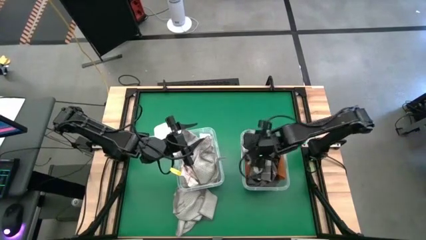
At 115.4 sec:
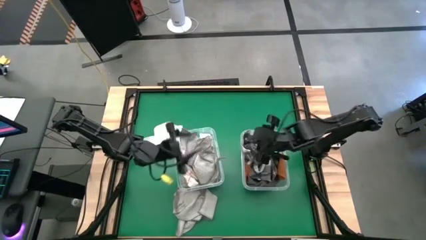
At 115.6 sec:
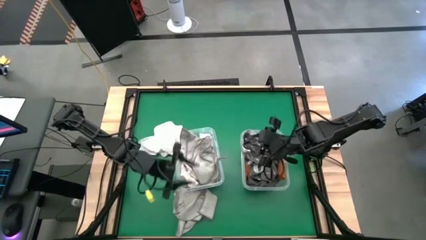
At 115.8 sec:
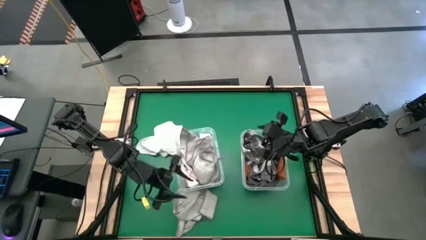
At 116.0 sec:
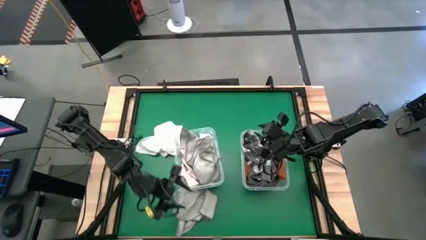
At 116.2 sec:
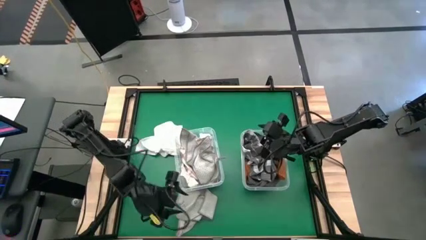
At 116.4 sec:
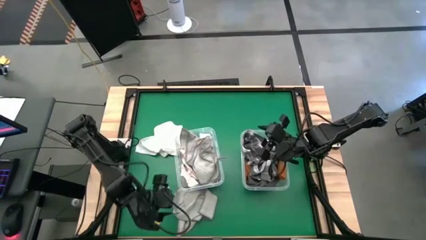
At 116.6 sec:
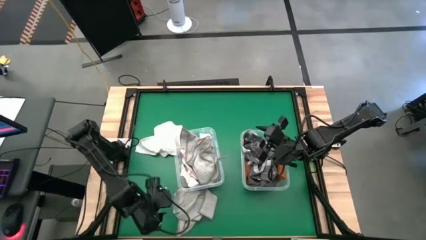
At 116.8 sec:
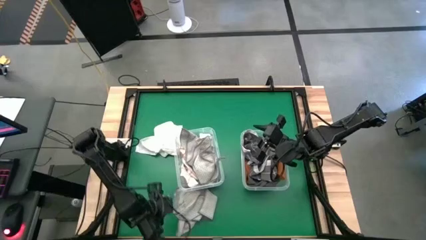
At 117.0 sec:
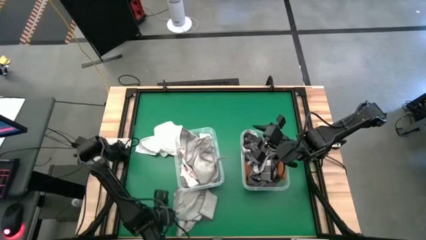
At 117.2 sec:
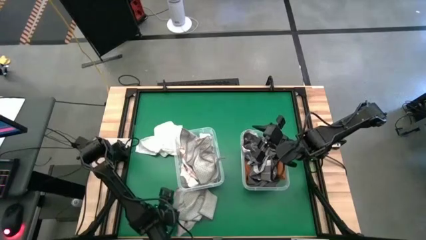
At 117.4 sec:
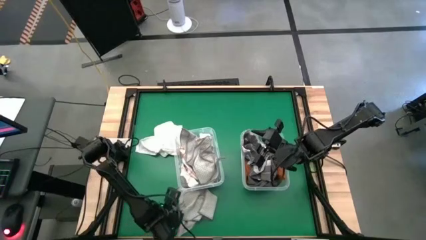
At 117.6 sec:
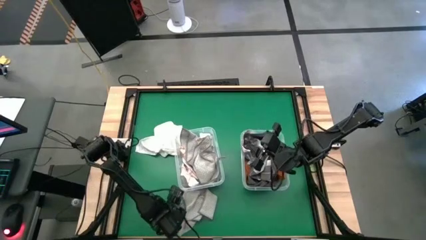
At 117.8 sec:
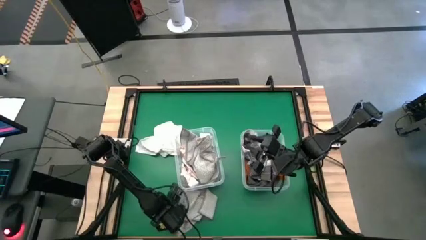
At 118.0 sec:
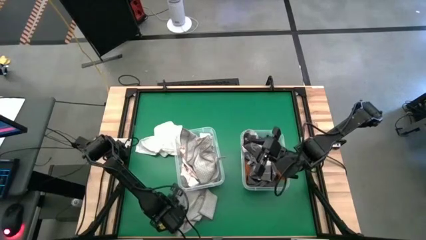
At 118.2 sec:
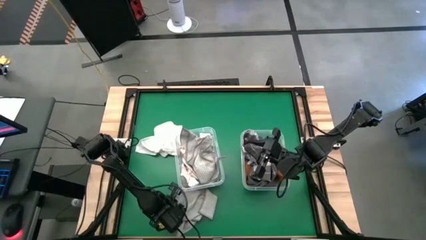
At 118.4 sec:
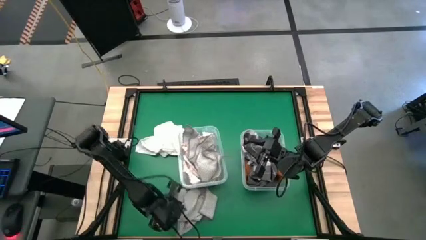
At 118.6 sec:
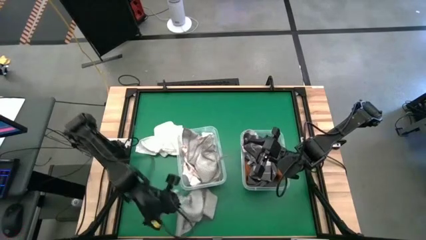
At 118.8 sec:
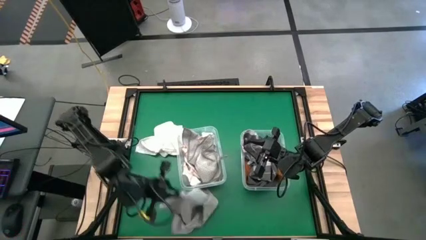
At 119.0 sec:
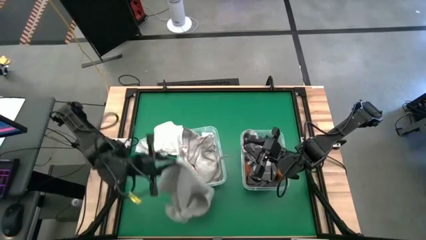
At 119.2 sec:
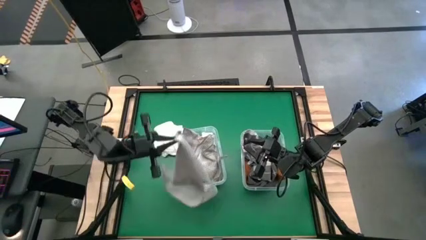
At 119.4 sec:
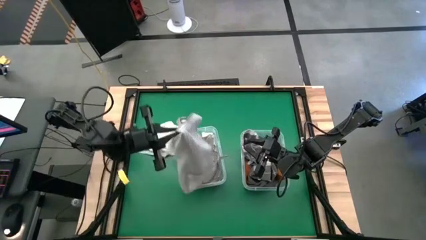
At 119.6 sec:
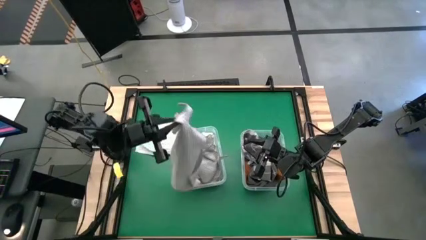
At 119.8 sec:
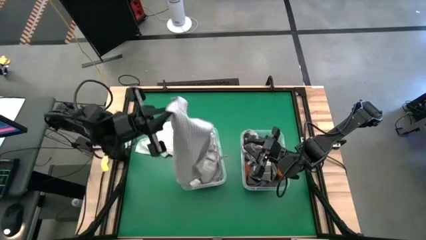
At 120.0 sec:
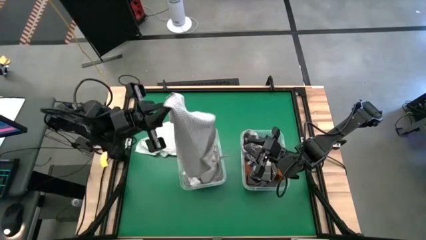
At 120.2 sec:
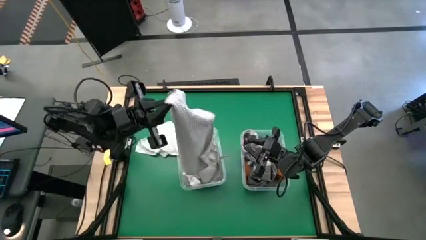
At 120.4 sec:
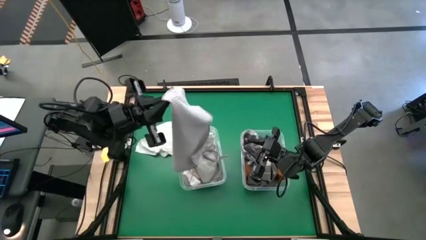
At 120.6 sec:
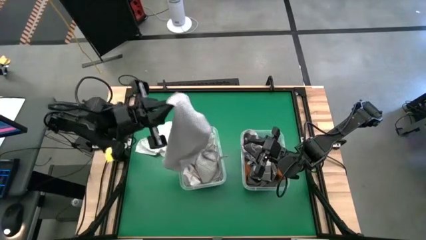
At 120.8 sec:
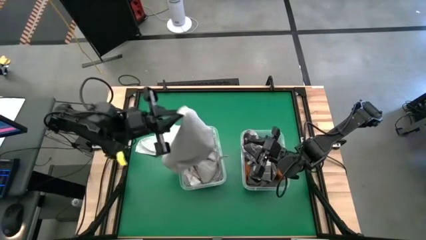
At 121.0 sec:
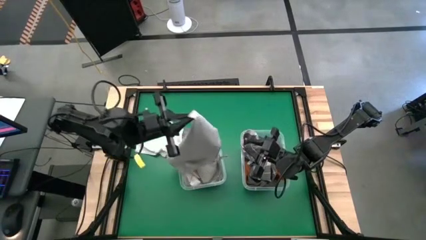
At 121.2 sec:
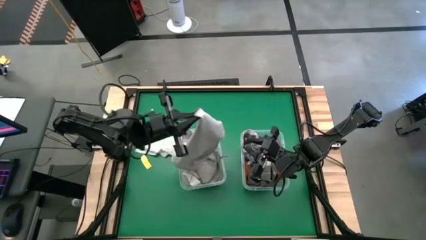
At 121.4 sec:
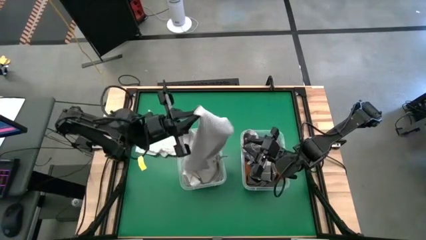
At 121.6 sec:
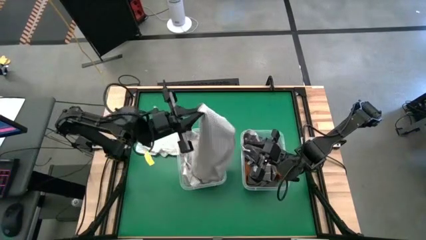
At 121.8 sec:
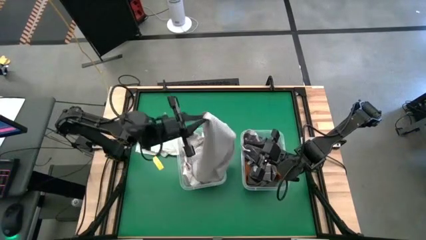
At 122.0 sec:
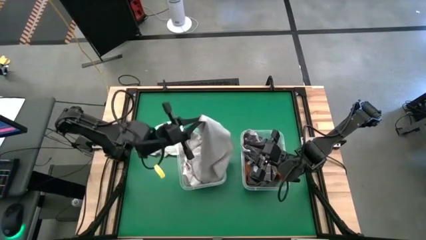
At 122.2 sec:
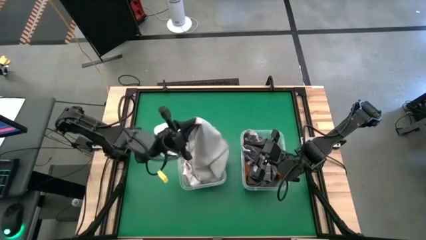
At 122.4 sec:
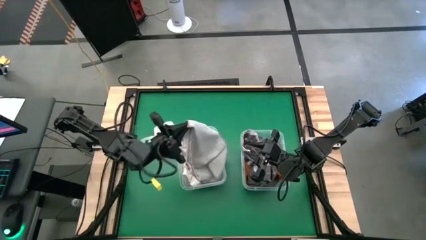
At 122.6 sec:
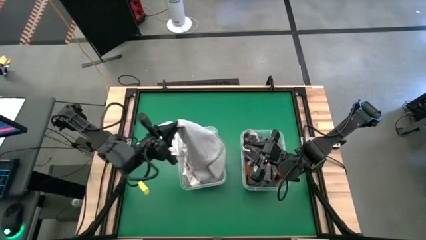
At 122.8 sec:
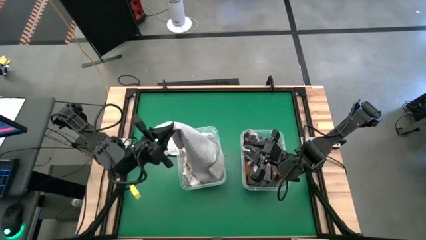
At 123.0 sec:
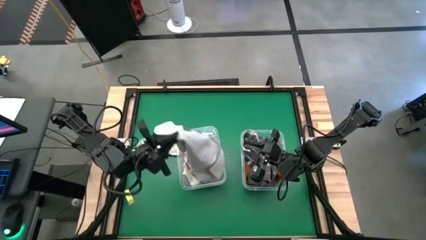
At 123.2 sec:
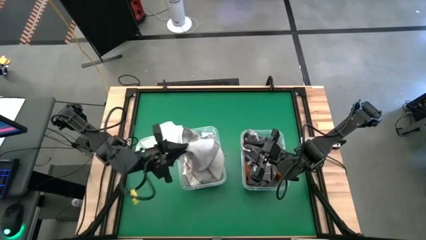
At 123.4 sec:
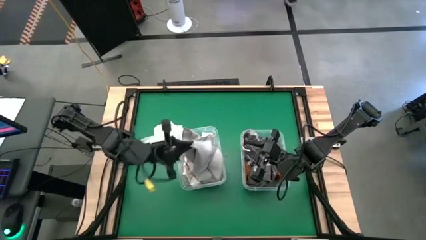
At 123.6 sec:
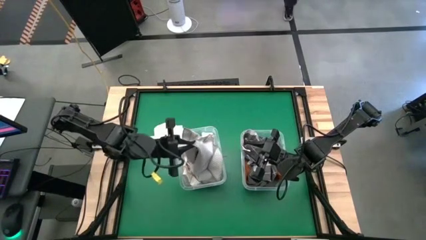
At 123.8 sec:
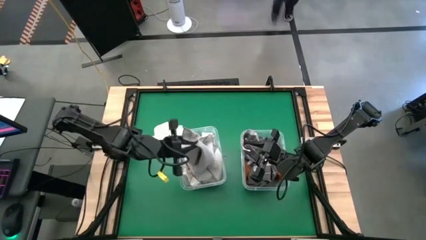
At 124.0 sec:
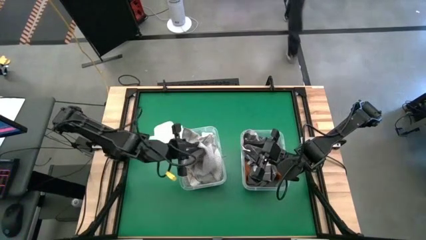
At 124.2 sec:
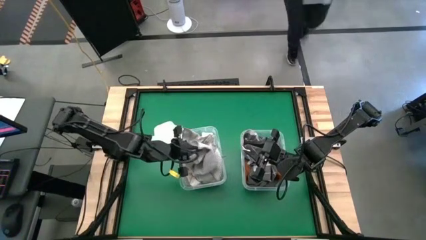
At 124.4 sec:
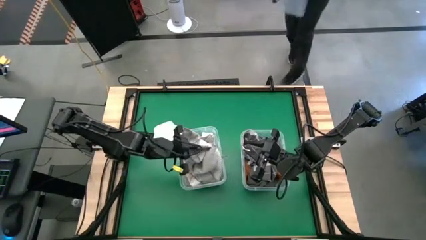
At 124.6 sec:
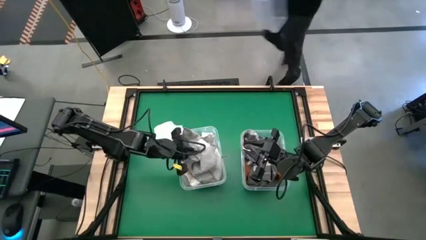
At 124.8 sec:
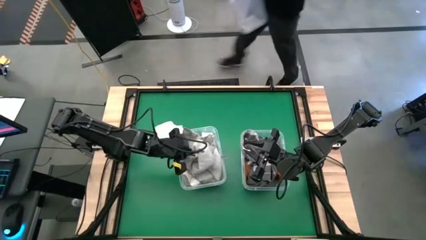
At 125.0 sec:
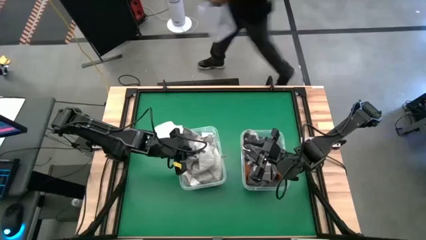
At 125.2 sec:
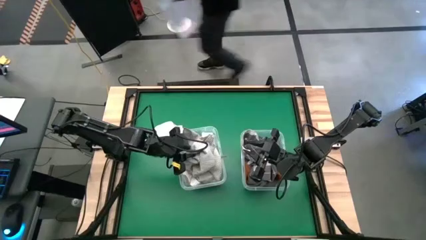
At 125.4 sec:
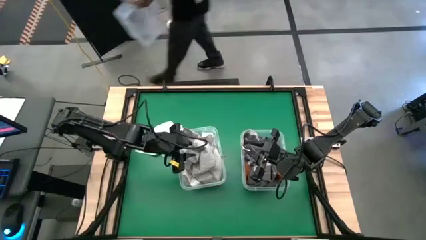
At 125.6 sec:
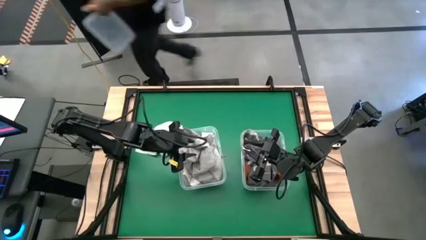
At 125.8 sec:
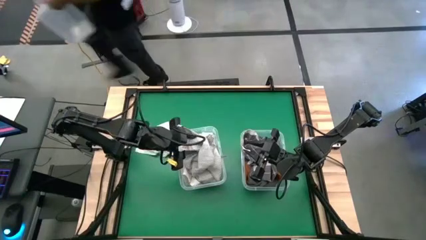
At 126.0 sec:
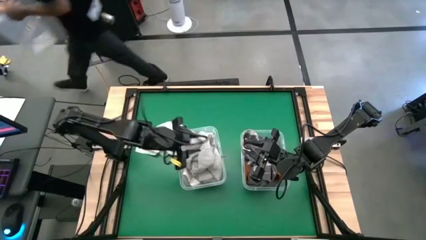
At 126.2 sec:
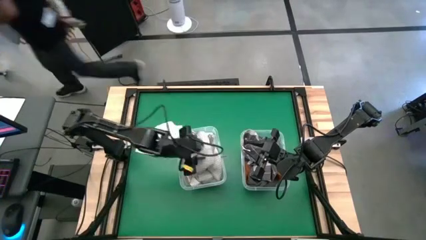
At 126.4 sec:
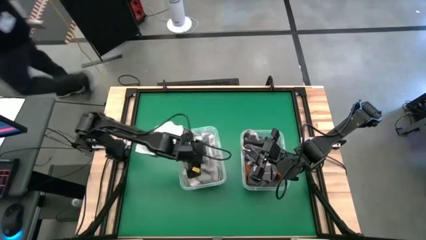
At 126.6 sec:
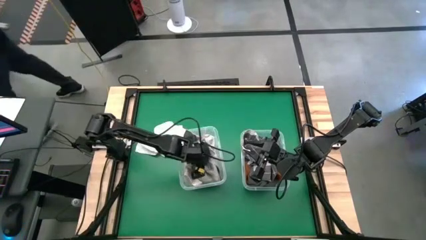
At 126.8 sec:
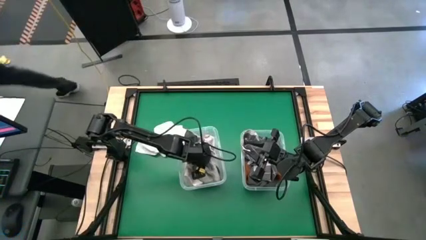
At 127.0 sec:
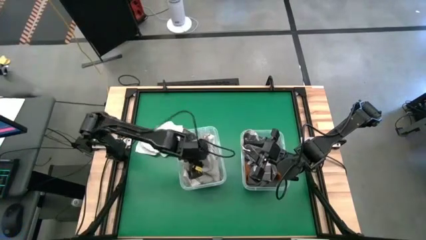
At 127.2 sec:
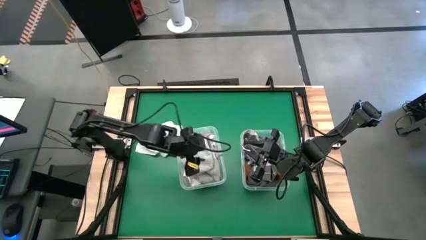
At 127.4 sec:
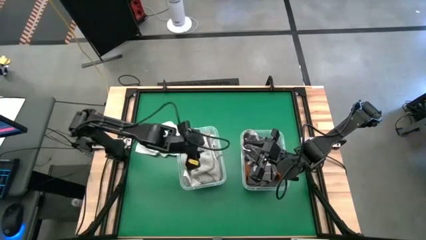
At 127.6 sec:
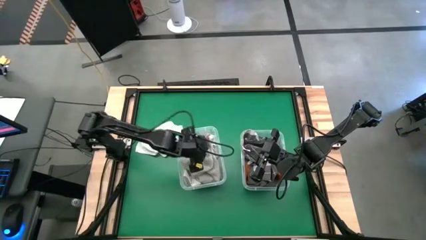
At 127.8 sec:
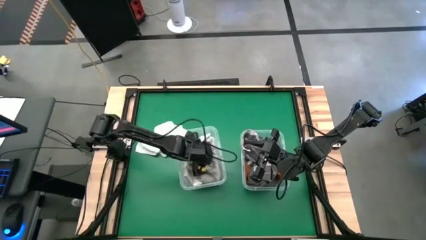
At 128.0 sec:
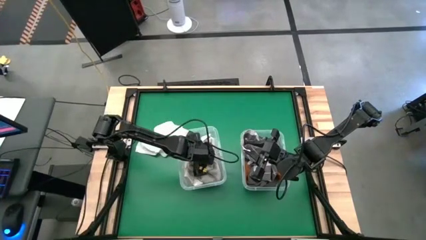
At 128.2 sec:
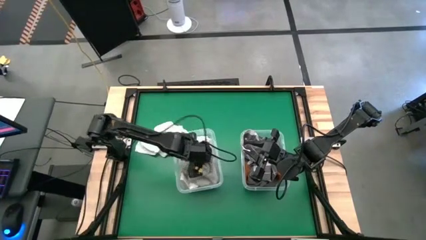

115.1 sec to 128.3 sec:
Task: Sort microfiber towel by color & place in baskets
Put the light grey microfiber towel into the left transparent bin
